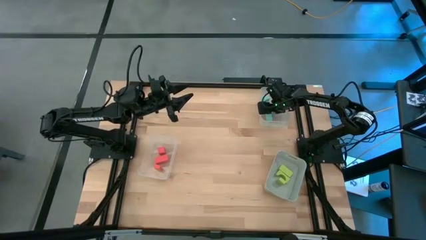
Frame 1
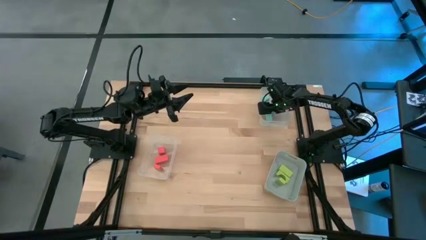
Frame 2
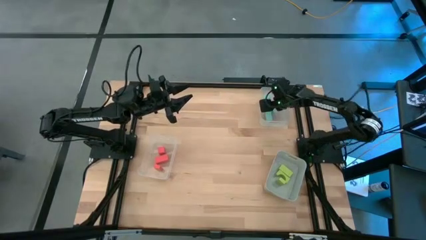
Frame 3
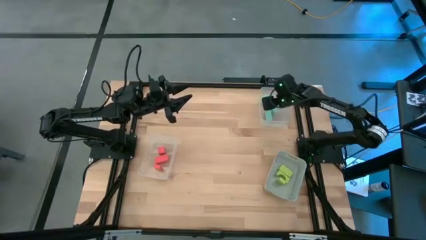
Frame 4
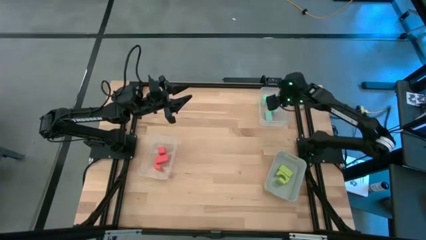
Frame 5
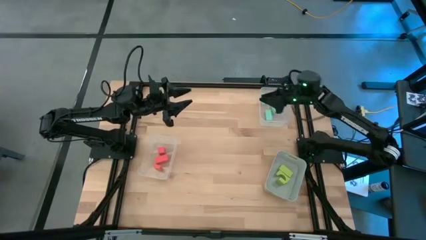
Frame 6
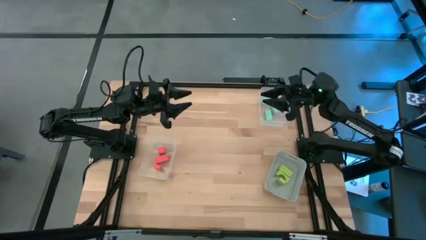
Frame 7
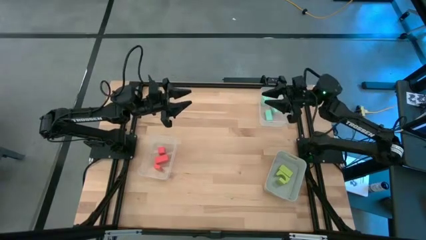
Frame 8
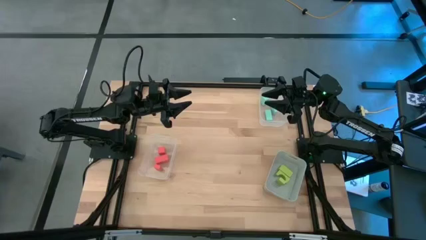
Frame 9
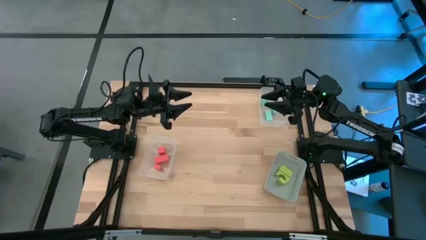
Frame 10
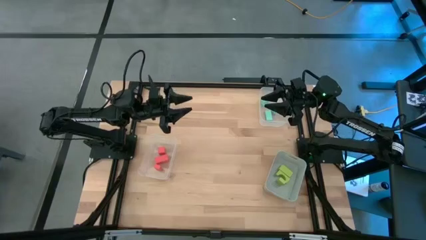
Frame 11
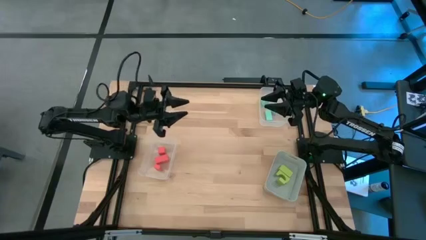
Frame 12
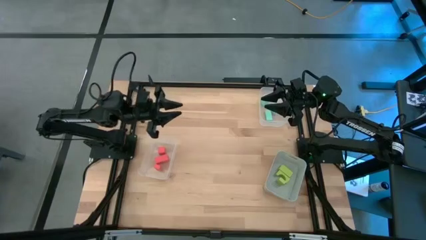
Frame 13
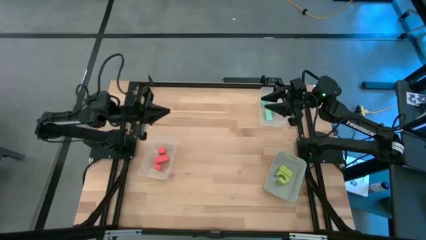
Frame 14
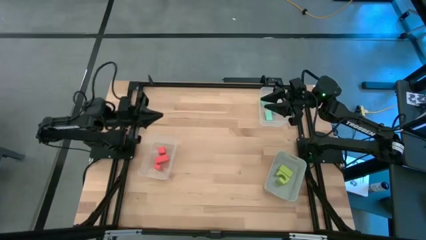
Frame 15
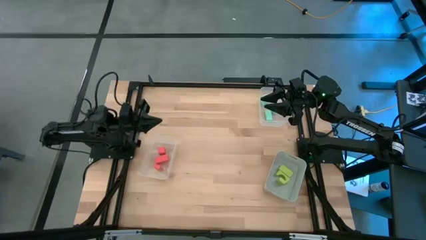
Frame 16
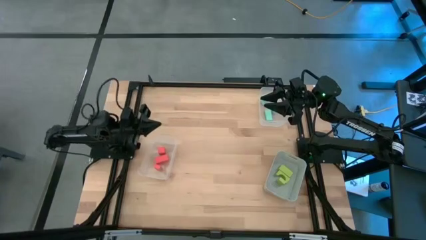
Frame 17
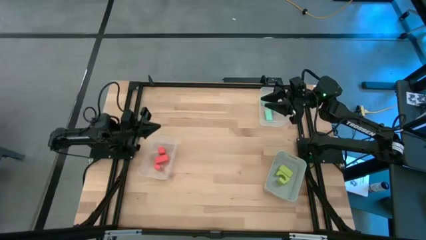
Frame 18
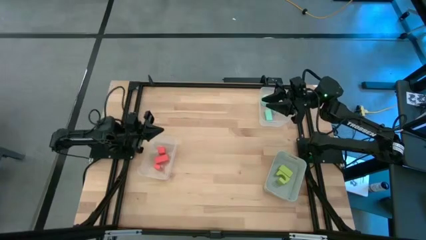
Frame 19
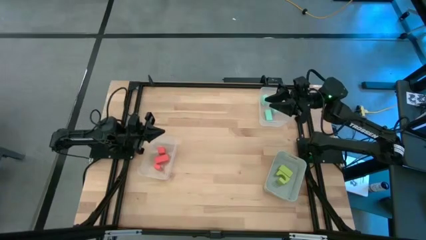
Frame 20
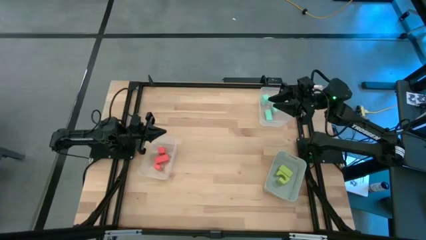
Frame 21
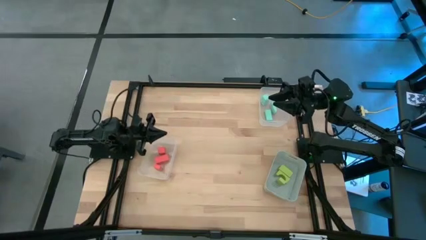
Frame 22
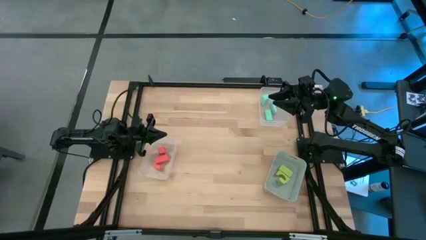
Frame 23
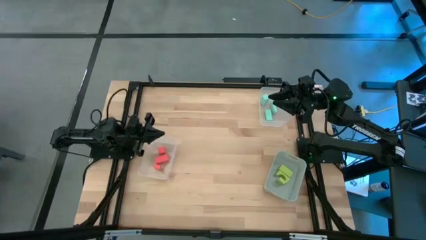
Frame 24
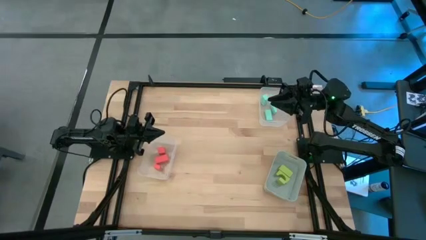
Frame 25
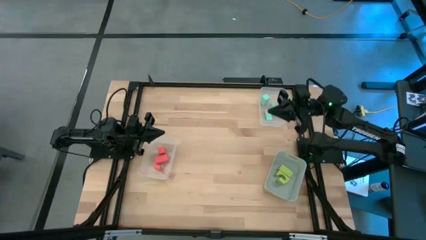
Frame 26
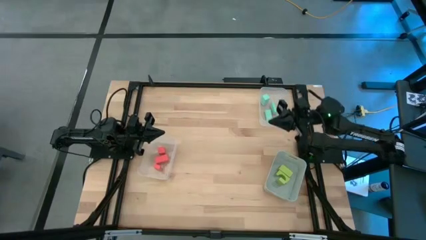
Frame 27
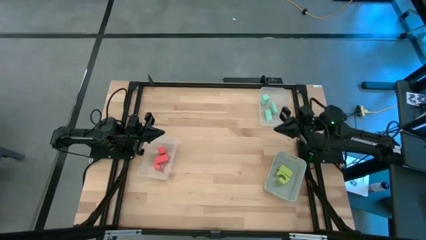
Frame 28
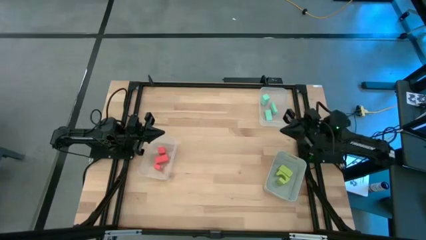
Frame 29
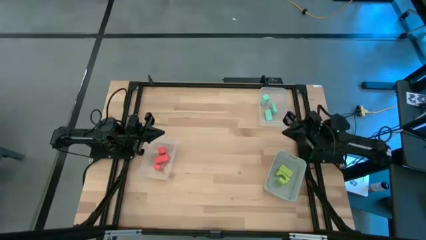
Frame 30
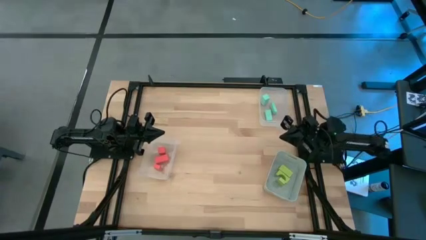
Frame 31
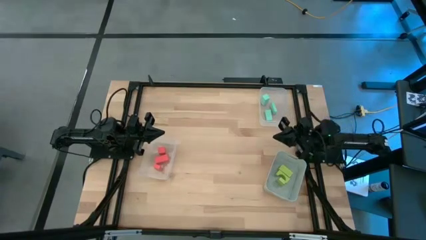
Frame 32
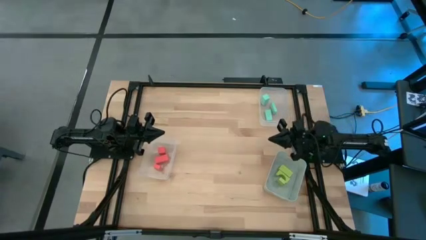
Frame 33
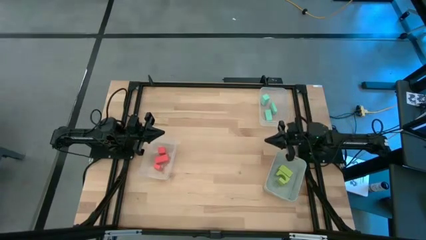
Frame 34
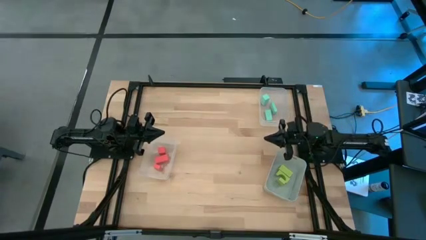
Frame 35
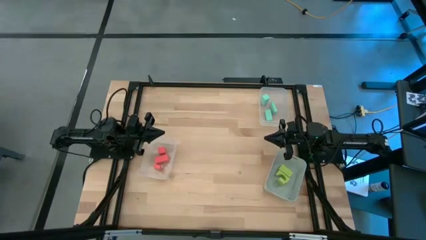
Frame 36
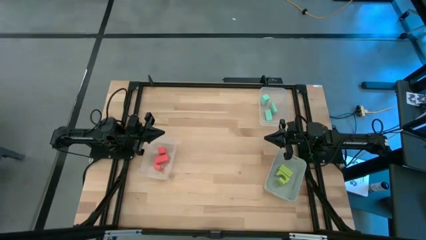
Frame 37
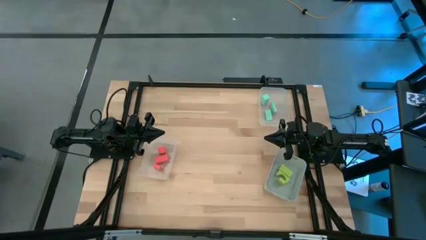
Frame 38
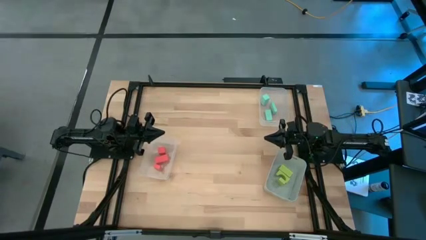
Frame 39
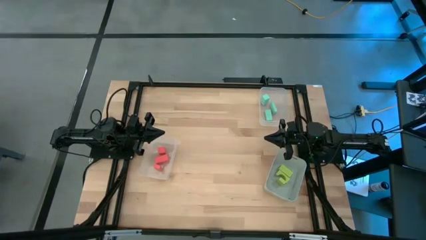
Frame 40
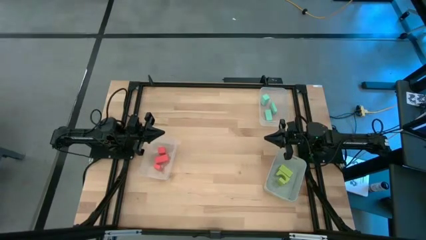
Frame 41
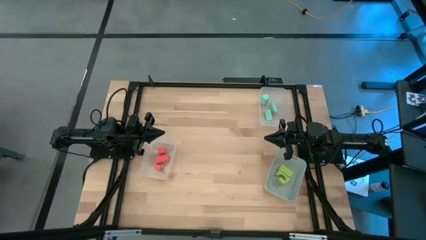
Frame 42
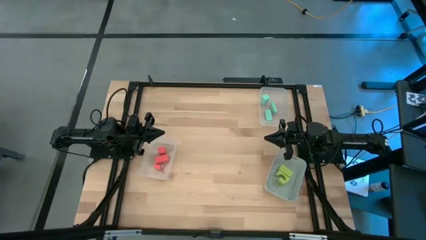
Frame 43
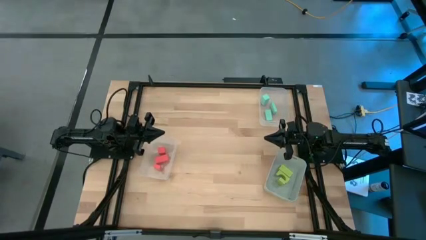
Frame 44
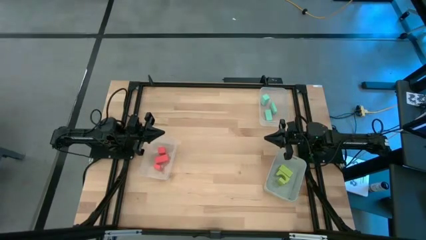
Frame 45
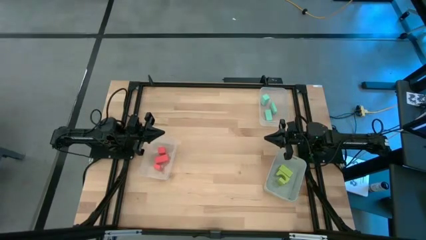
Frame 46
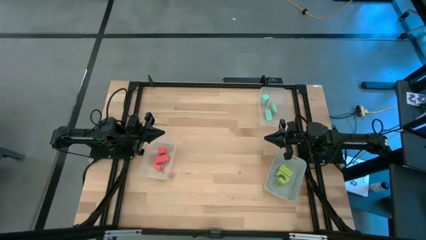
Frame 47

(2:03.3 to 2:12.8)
Task: Sort & place blocks by color
Return to Home Position

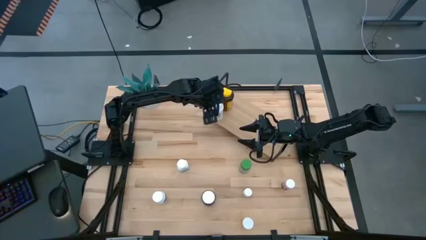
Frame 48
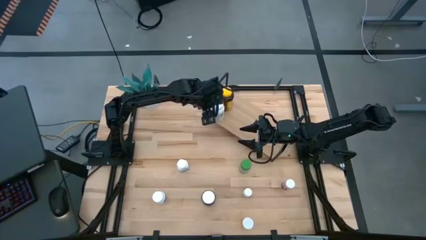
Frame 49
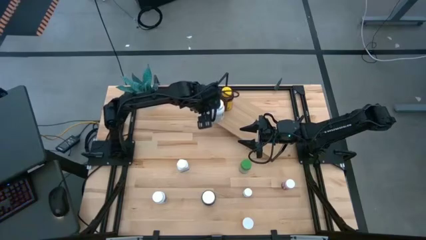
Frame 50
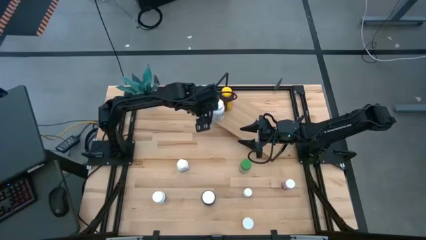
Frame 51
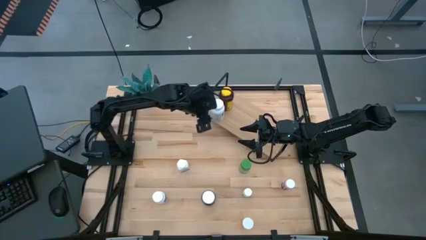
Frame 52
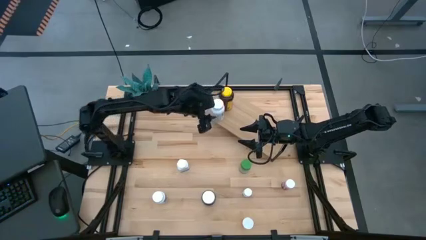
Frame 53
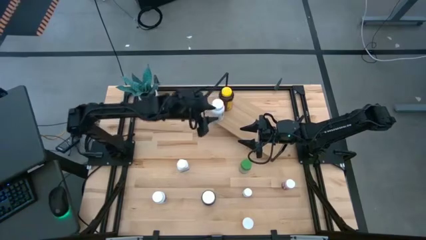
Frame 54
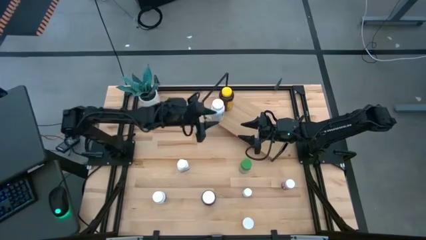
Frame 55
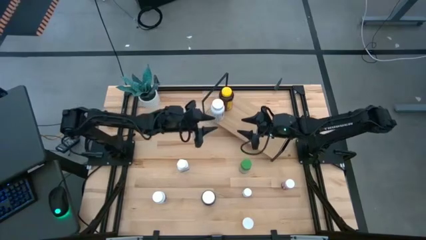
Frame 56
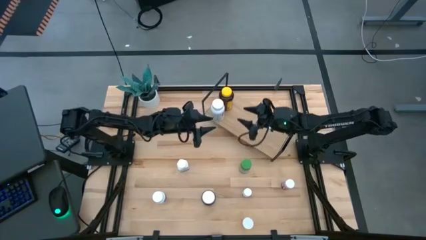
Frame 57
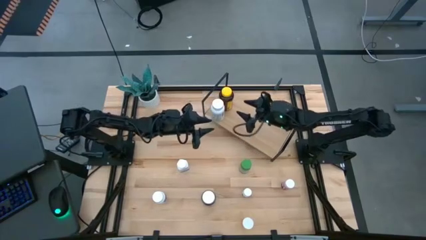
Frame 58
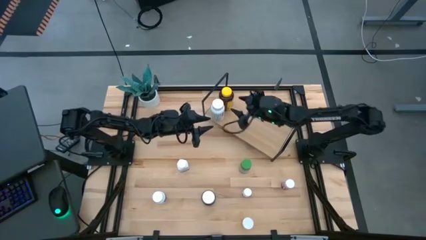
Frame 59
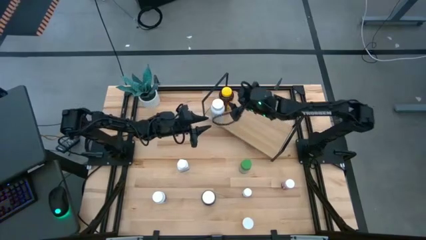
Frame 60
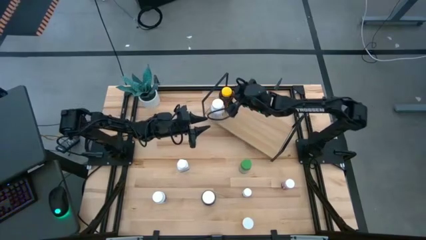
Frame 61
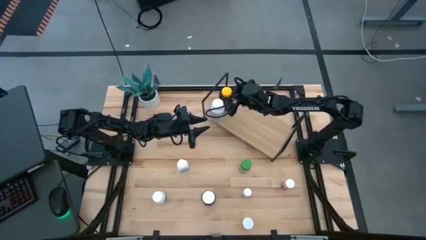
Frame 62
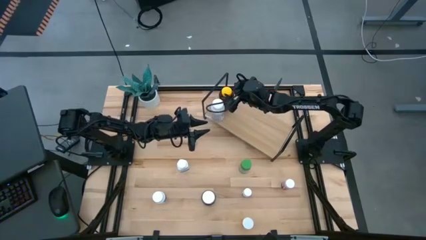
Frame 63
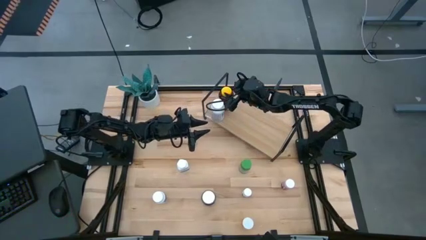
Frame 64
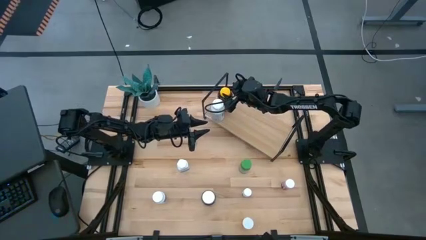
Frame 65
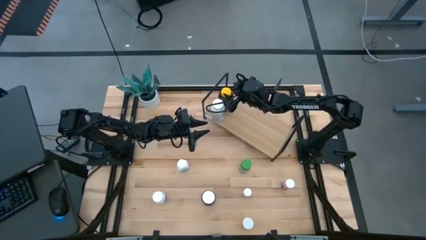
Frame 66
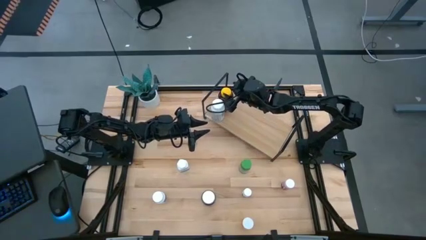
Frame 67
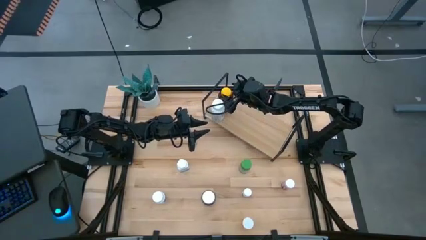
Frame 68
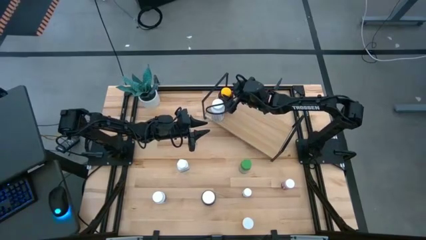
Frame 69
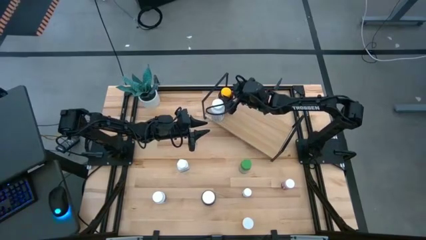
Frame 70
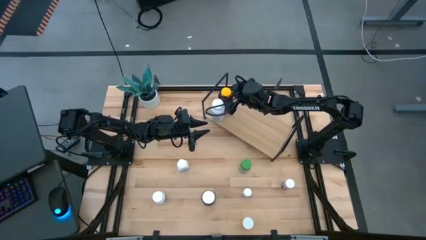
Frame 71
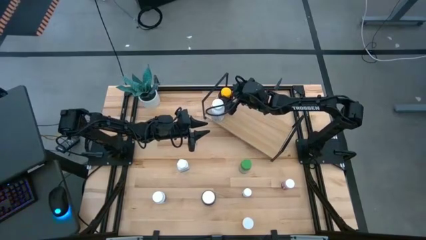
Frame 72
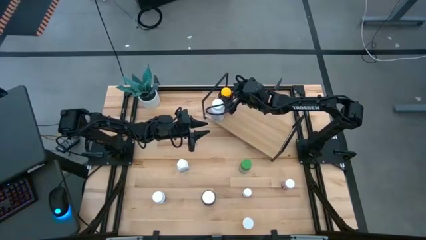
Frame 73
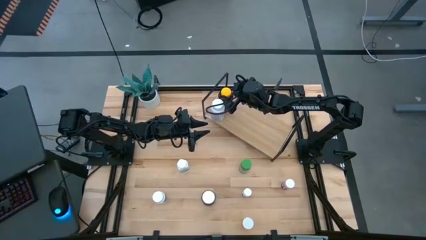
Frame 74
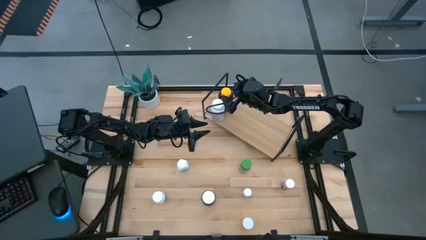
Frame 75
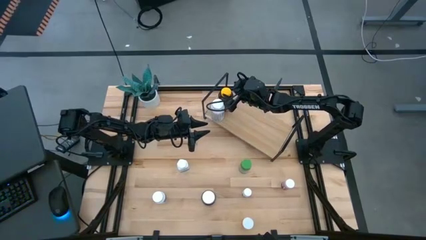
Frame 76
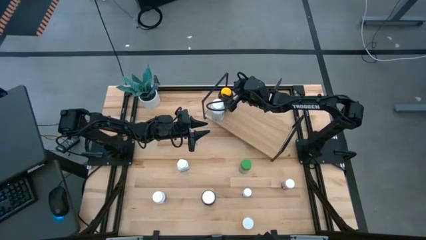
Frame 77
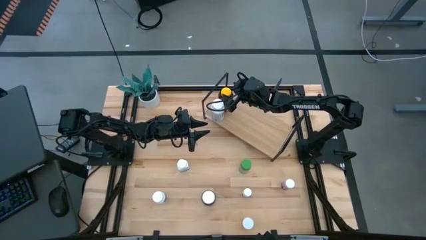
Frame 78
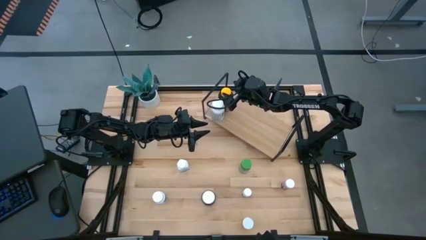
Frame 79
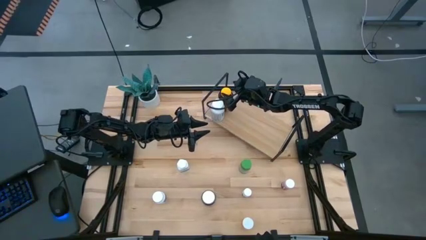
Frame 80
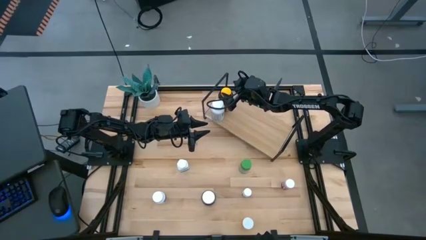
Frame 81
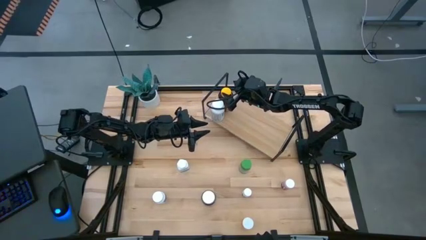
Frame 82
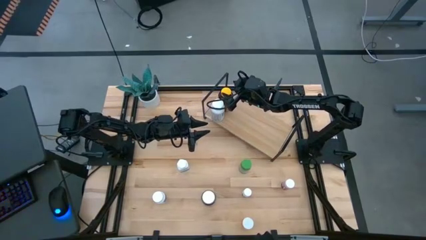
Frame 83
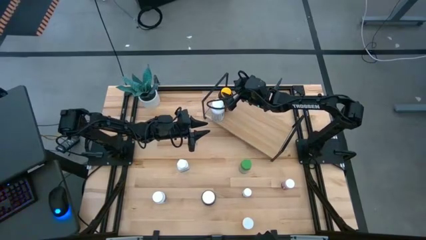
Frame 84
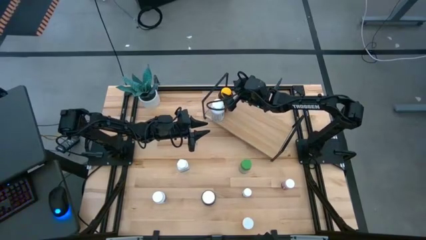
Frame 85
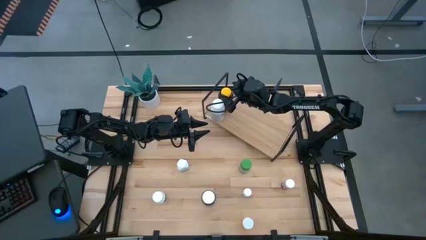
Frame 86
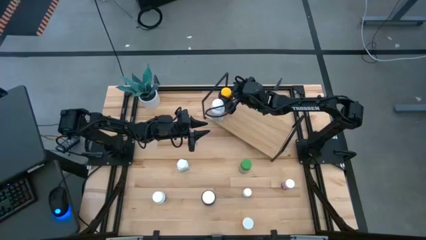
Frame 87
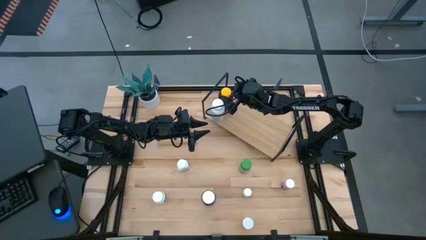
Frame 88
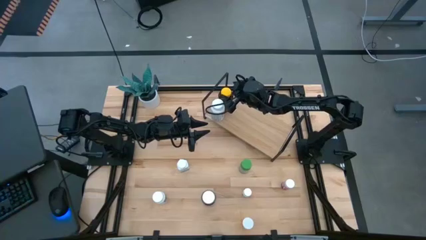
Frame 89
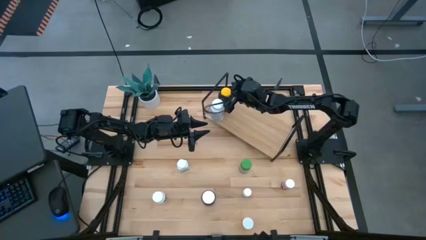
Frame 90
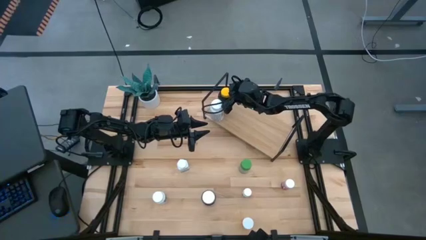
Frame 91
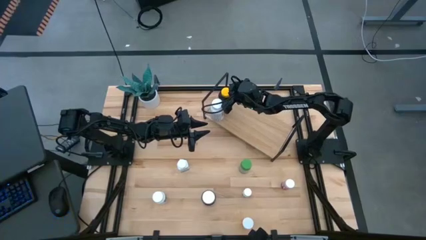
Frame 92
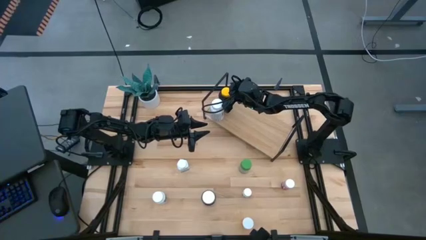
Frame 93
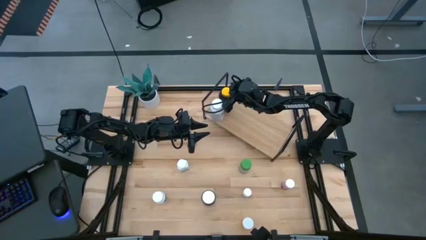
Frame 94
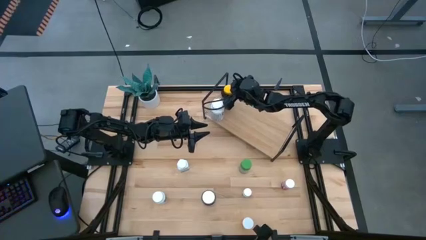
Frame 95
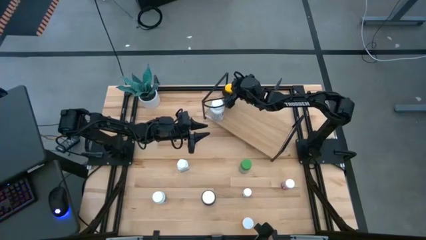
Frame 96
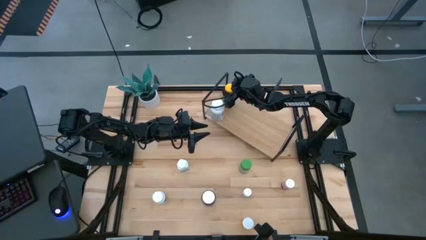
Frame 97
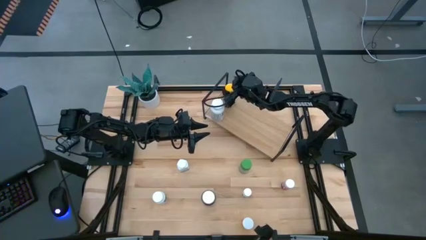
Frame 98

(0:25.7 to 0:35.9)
Task: Pick and place medicine bottles onto shelf by color
Adjust the yellow pill bottle on the shelf
